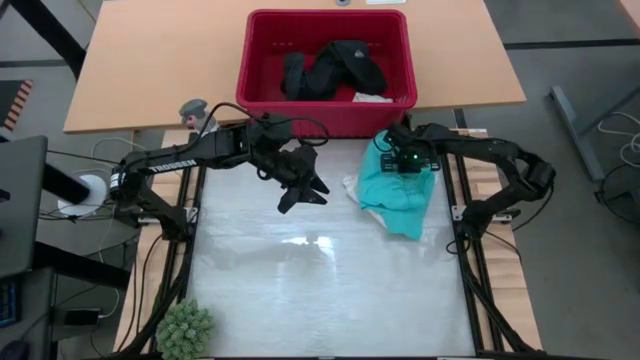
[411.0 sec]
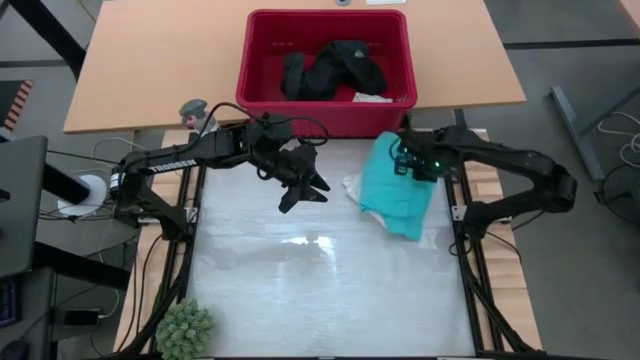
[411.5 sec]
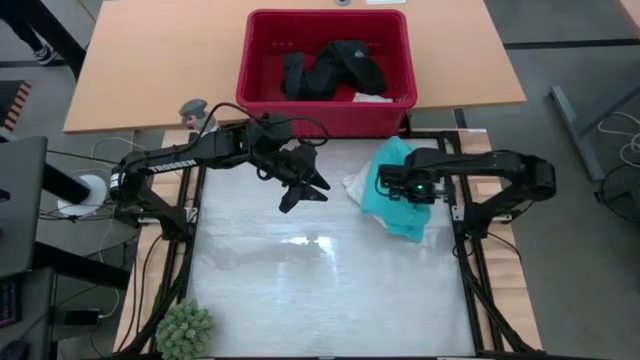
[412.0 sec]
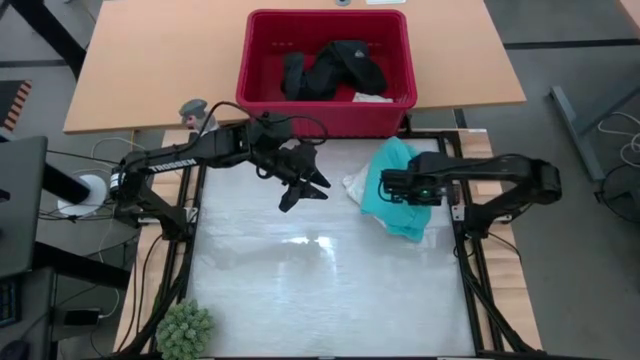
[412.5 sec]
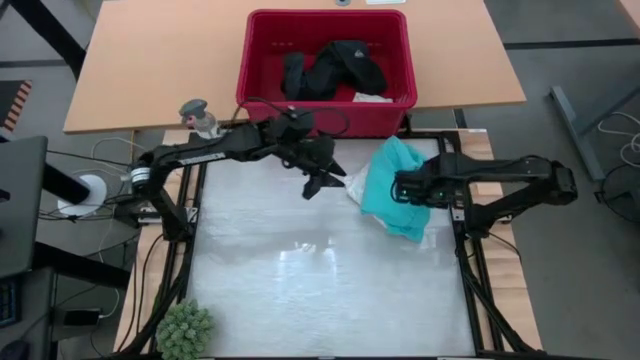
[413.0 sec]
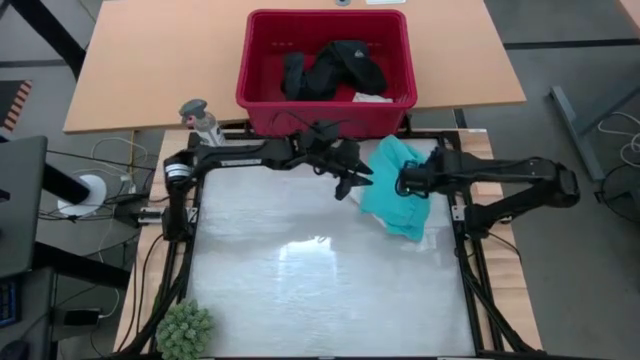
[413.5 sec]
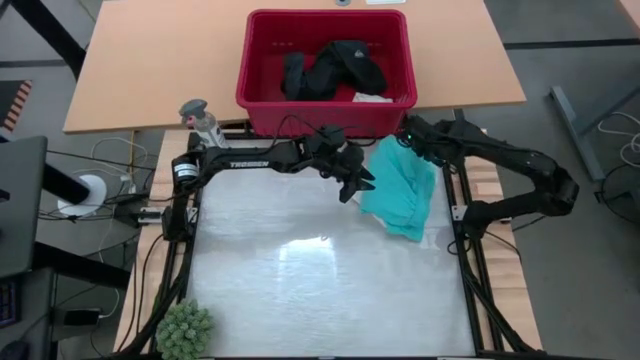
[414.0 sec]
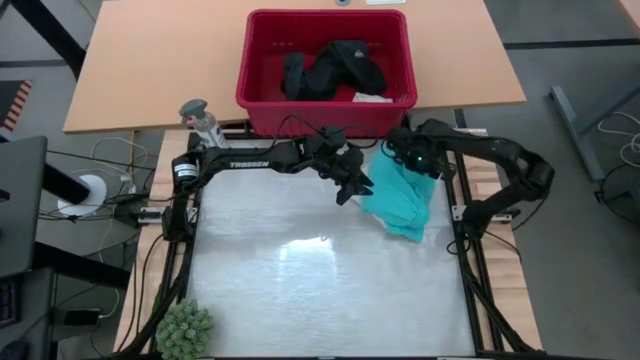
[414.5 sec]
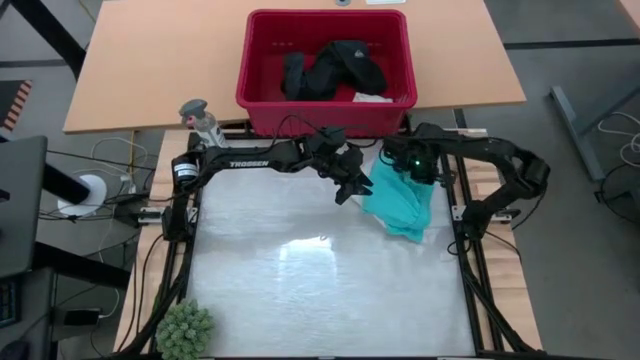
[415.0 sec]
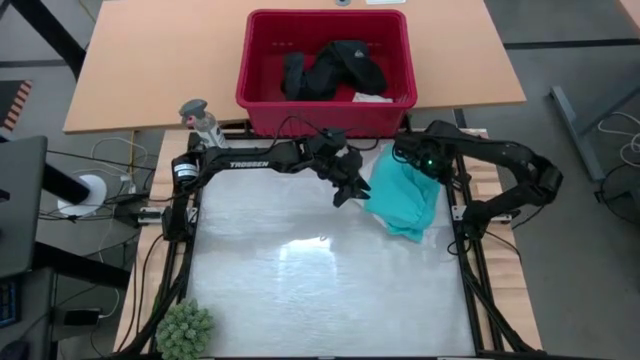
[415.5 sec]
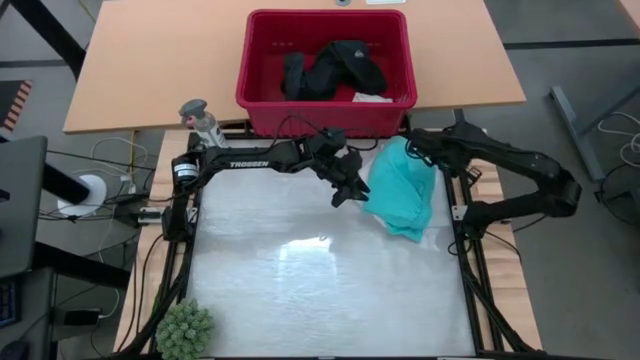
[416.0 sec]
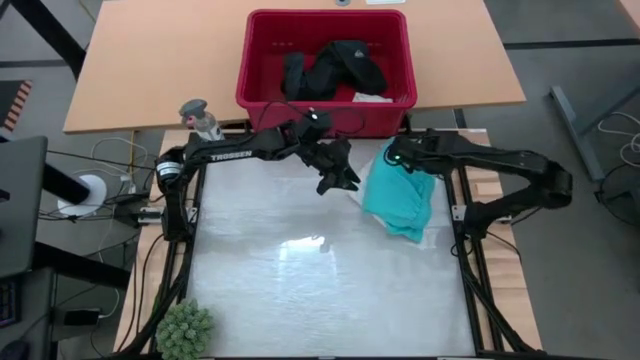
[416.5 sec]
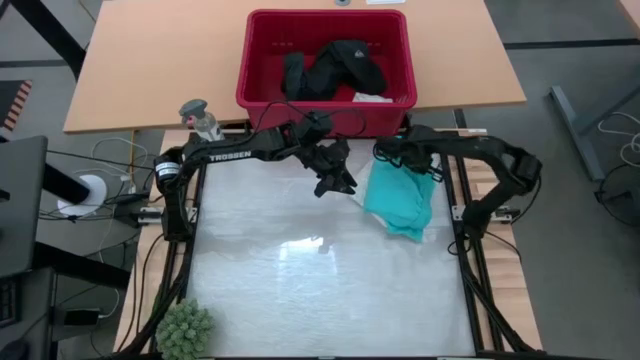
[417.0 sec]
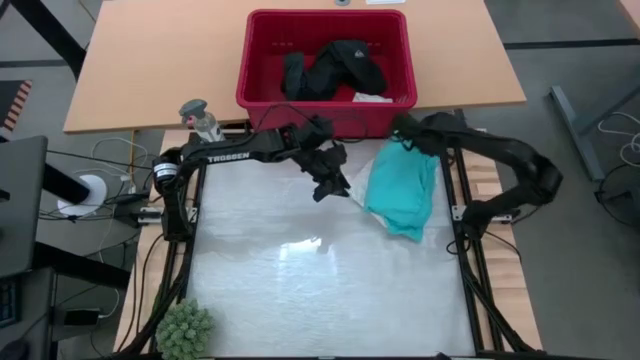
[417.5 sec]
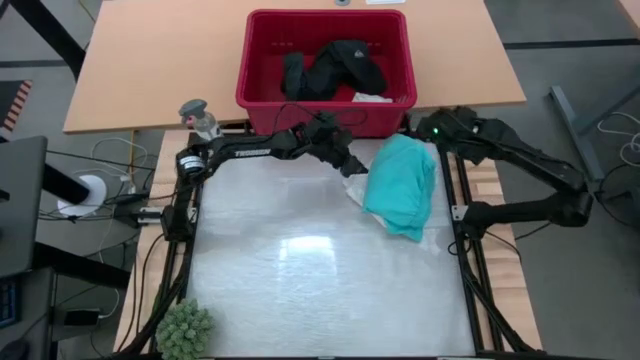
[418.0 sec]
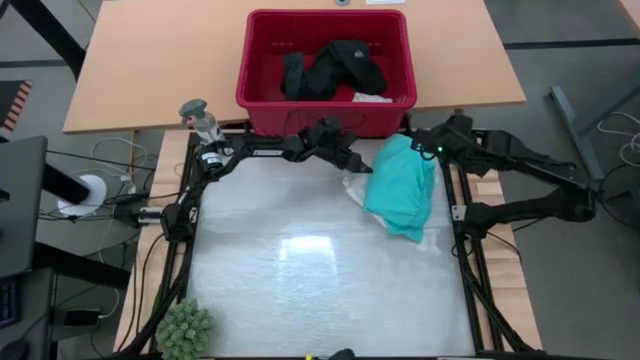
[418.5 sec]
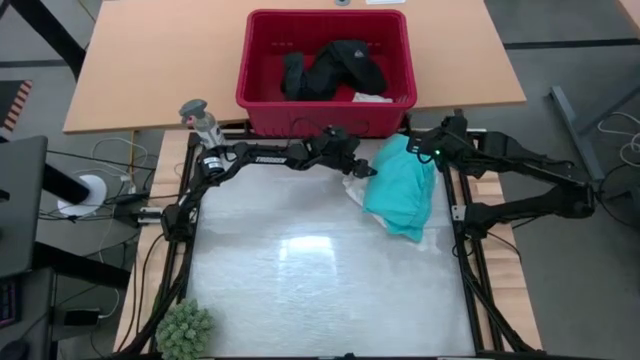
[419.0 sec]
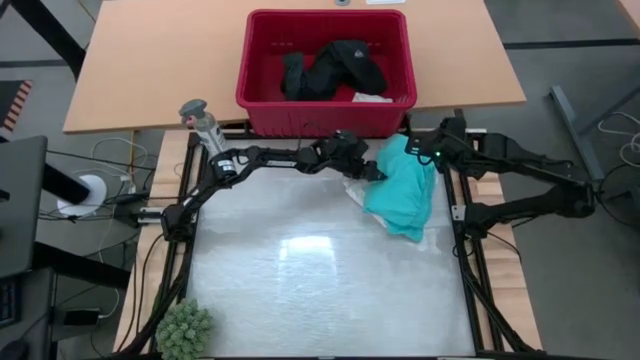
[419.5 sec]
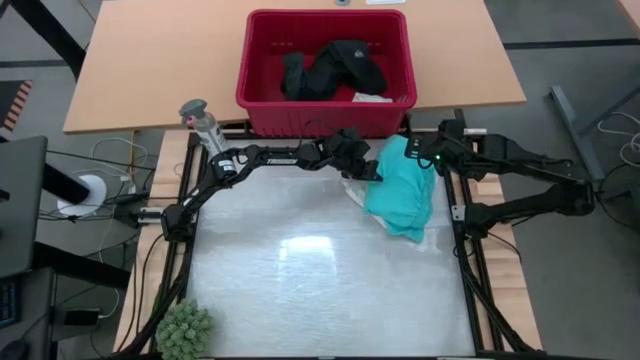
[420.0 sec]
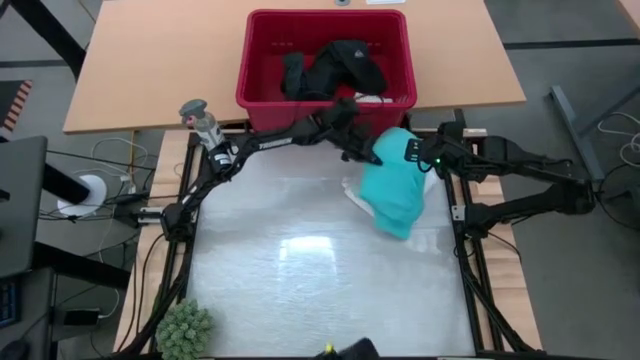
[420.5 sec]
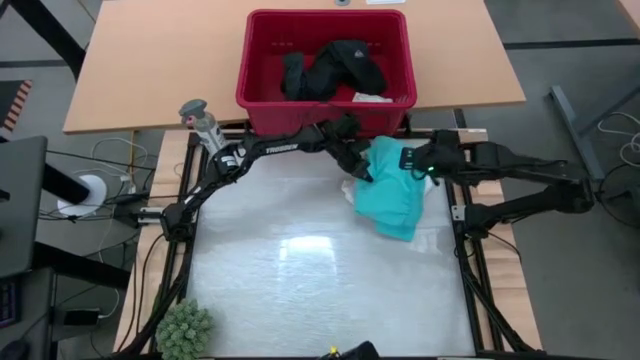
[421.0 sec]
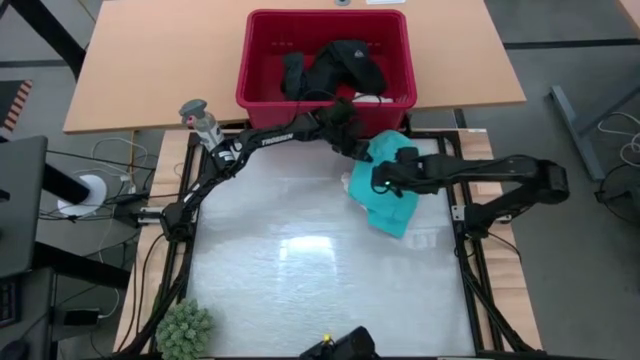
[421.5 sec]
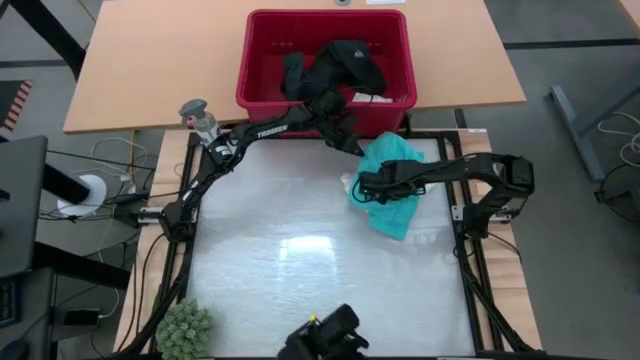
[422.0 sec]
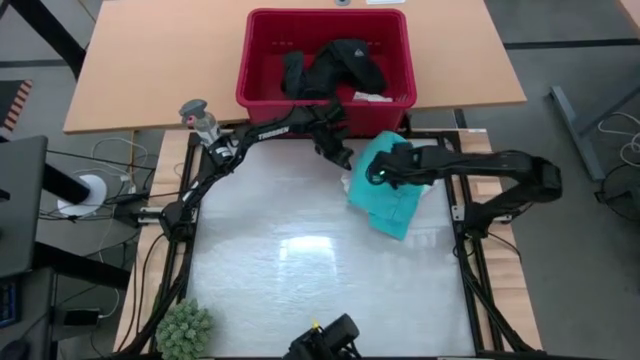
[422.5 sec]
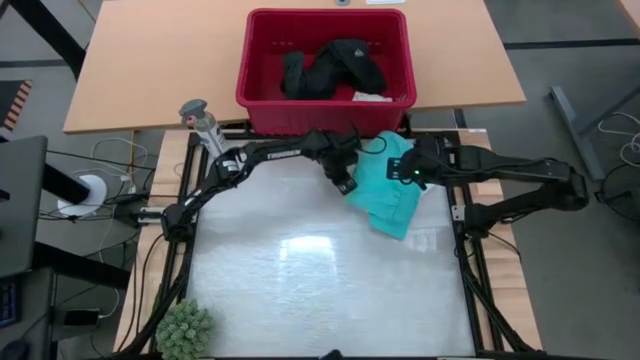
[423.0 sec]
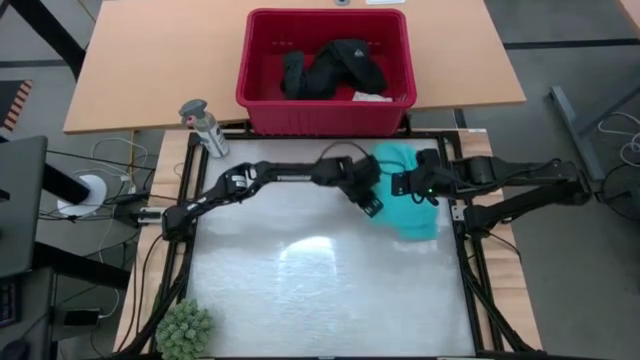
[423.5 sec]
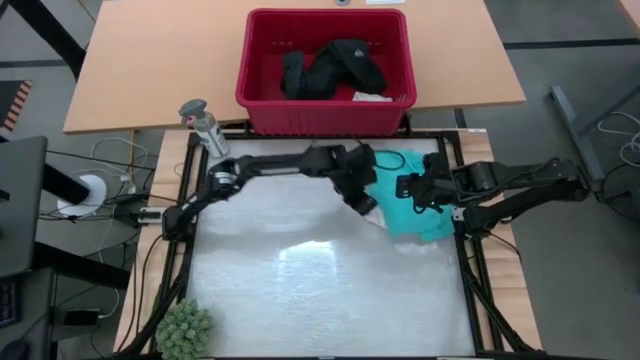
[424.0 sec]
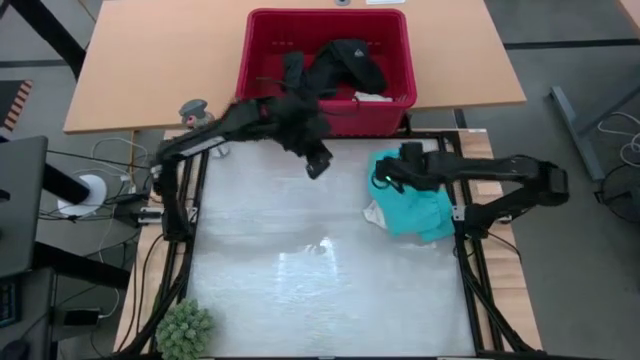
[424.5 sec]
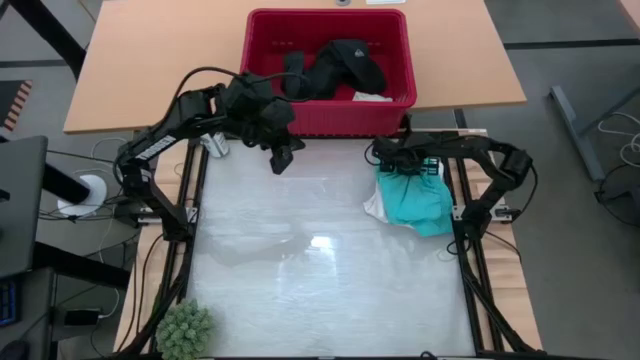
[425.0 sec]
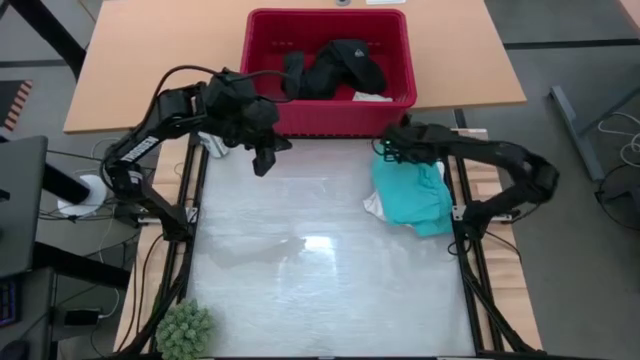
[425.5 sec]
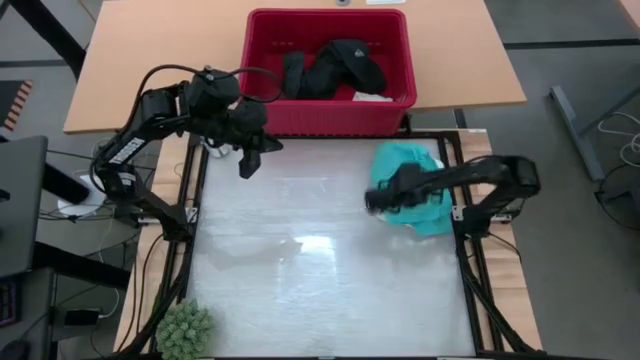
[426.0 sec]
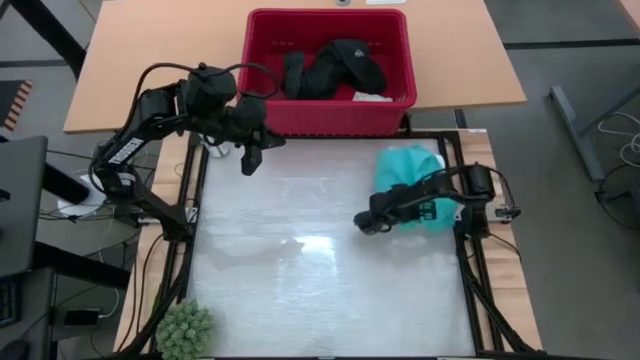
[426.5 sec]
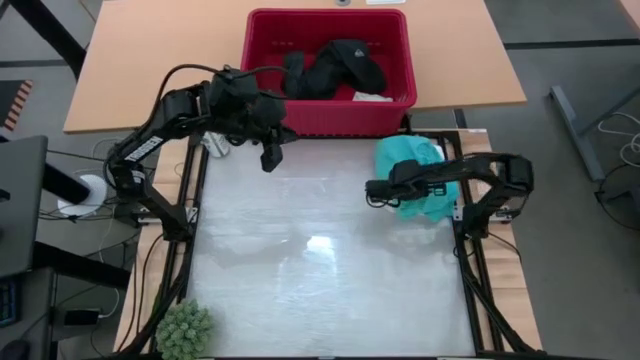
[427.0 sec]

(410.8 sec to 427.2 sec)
Task: Fold Laundry from Bin
Stack the light blue shorts on top of the white underwear
